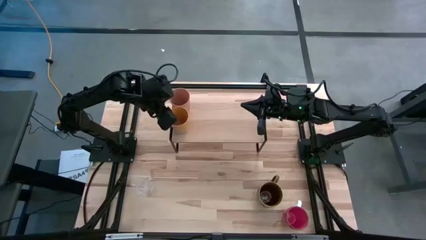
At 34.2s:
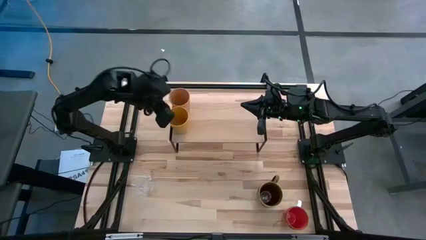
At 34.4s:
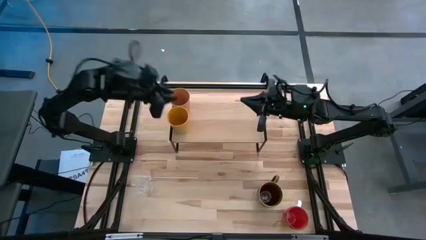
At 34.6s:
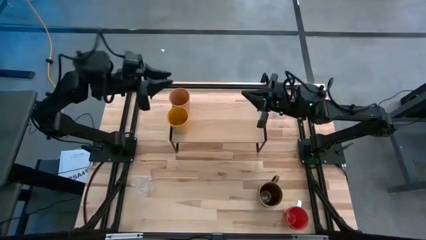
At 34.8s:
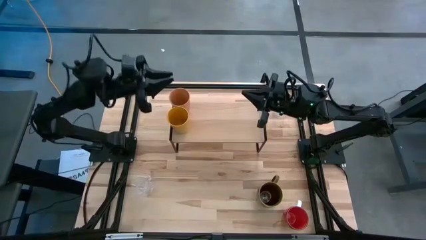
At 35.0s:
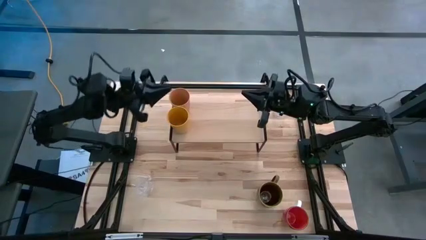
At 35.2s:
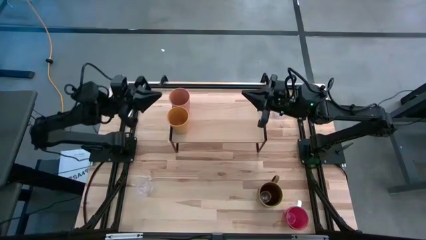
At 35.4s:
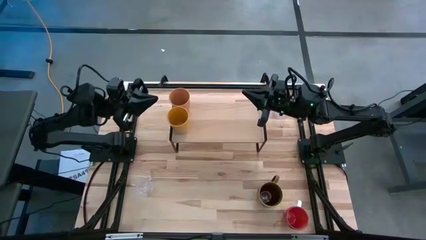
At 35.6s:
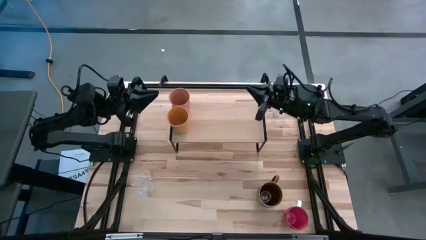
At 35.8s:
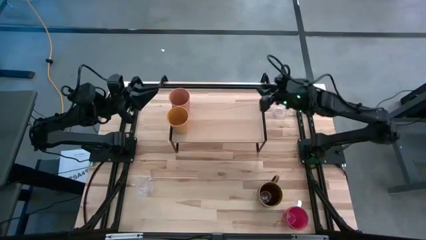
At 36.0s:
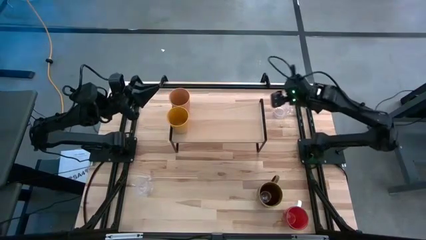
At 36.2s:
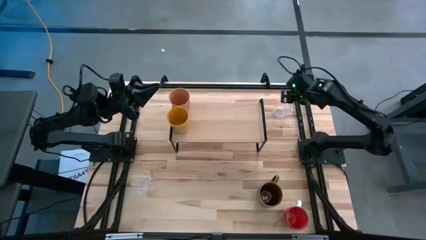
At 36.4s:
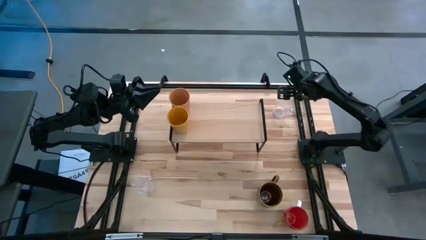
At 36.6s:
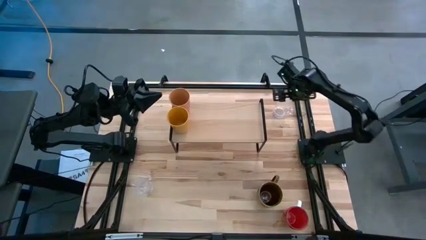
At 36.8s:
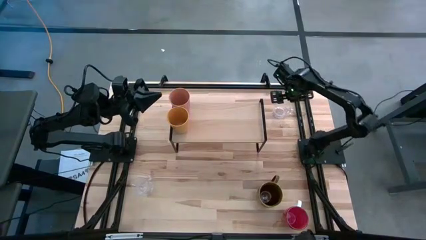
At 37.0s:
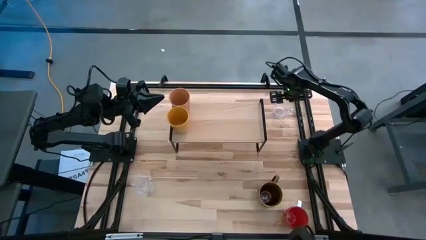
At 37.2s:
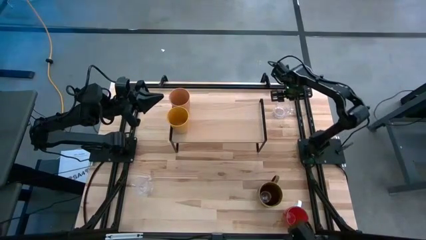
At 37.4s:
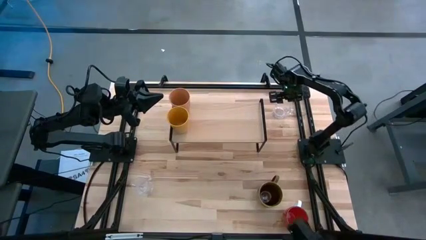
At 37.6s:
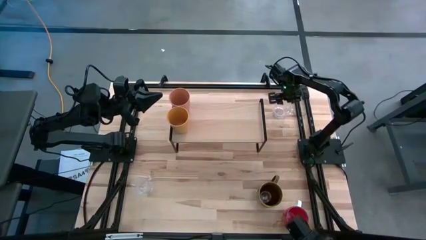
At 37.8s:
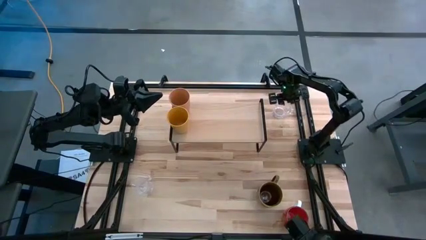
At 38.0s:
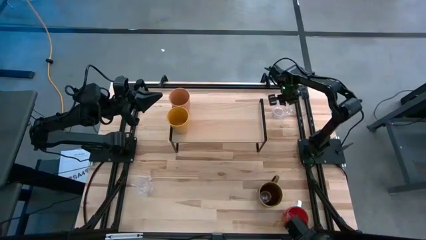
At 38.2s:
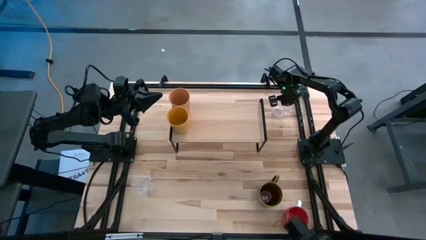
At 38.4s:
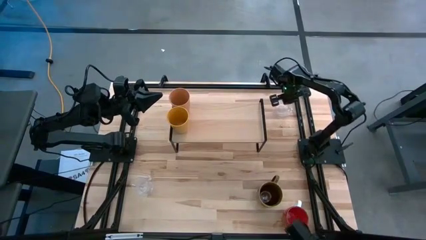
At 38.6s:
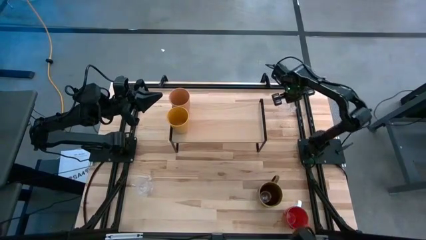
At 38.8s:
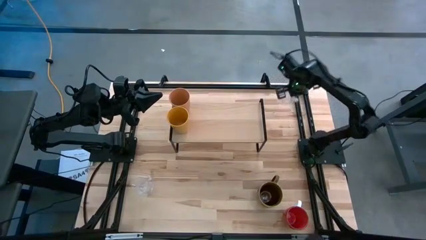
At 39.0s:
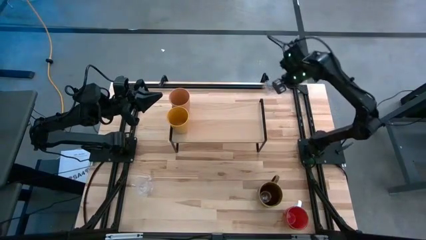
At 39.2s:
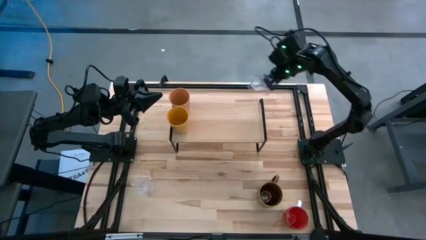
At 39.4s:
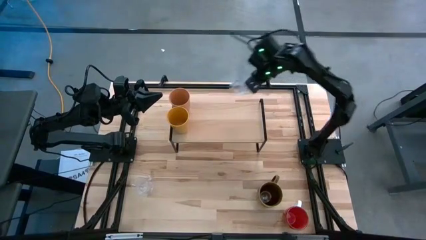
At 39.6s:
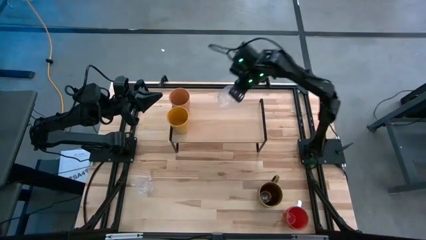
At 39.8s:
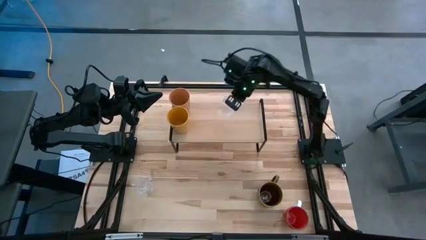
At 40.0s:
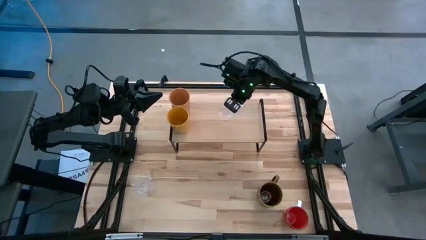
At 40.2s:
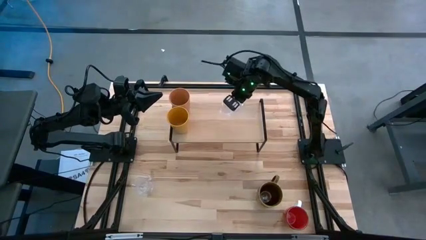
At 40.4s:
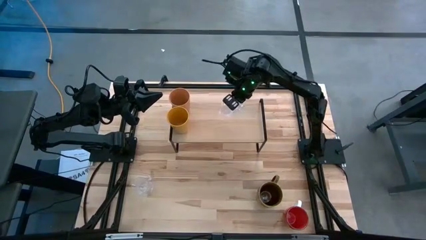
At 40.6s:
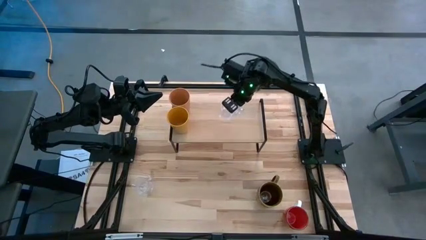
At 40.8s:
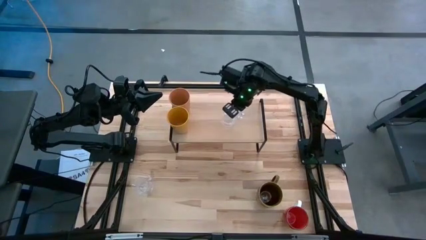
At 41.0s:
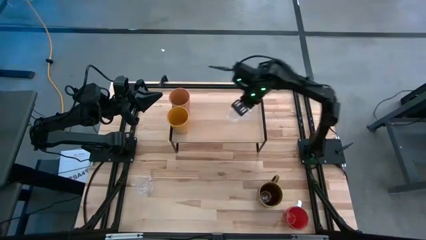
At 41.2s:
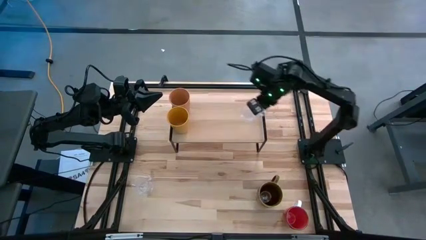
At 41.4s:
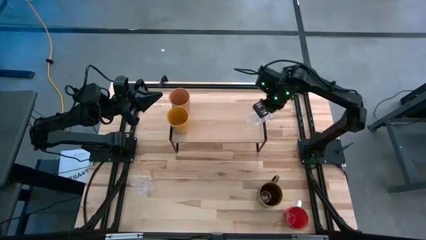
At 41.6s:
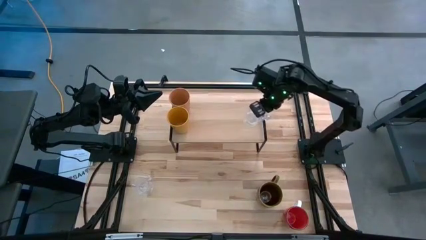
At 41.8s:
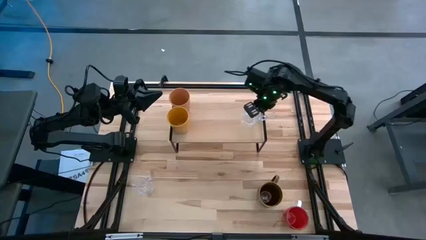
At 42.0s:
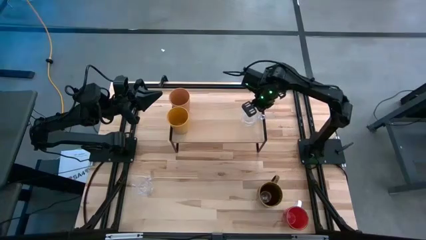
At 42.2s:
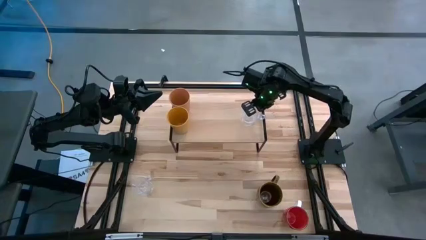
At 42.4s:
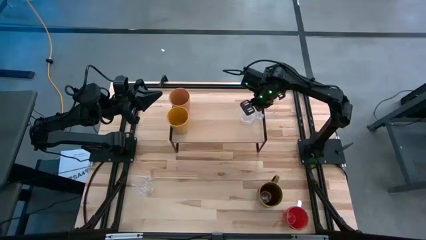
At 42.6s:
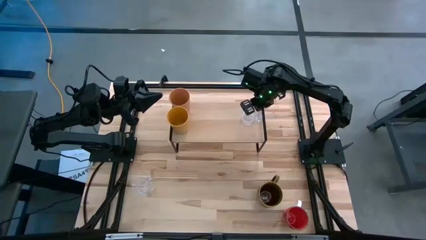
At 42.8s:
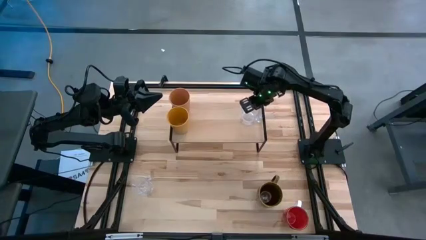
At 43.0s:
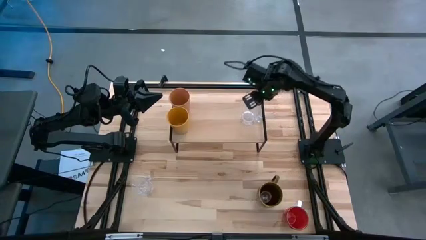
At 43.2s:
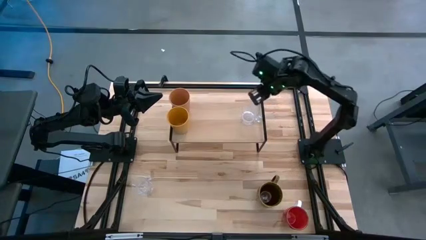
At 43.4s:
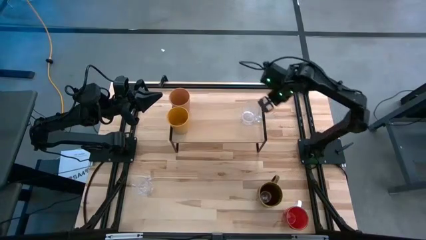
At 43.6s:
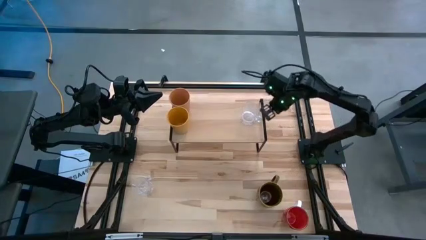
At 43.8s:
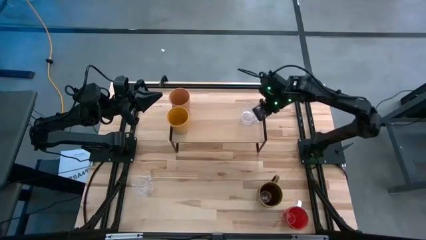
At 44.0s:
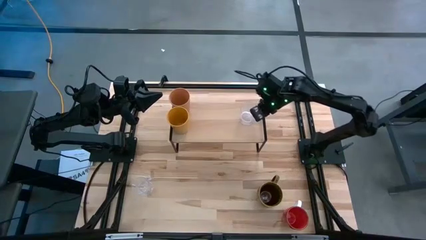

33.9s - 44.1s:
Task: Stack small to large cups/mugs on shelf
Put the top transparent mug on the shelf

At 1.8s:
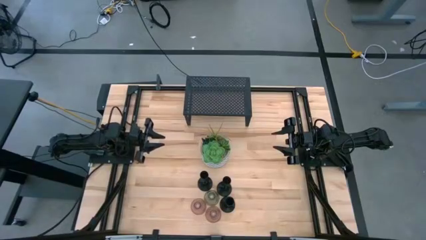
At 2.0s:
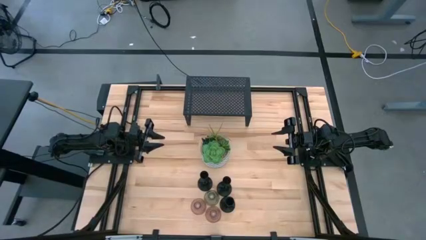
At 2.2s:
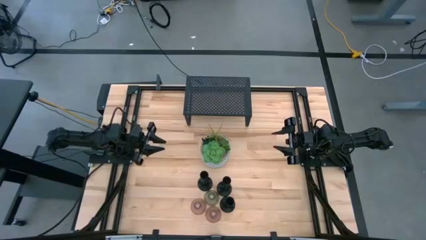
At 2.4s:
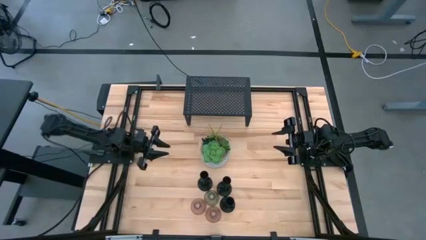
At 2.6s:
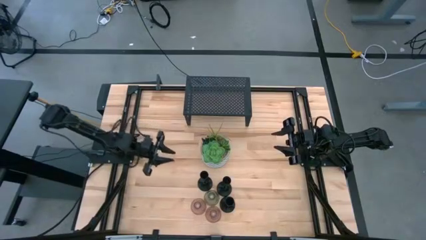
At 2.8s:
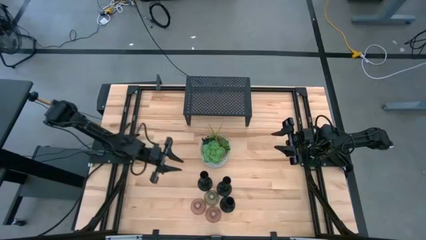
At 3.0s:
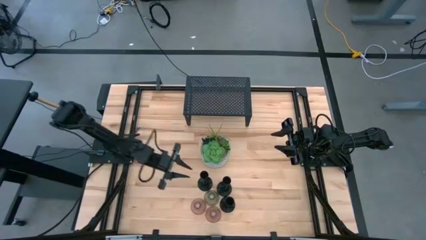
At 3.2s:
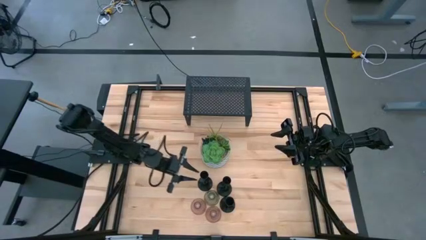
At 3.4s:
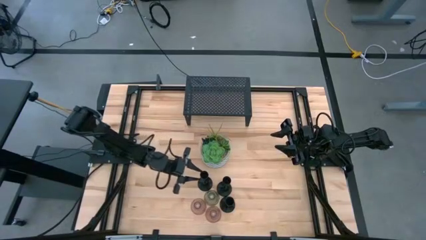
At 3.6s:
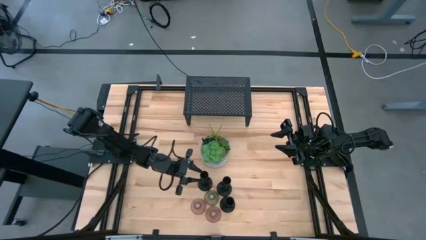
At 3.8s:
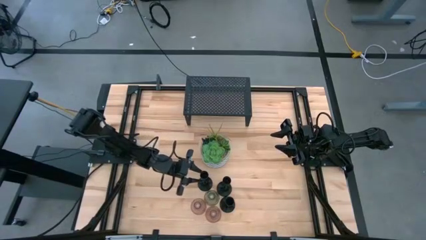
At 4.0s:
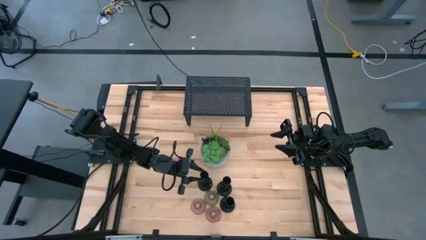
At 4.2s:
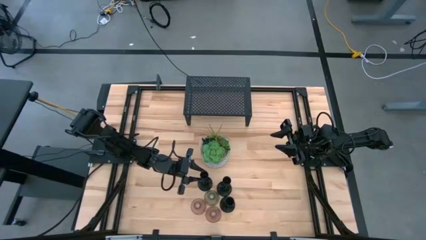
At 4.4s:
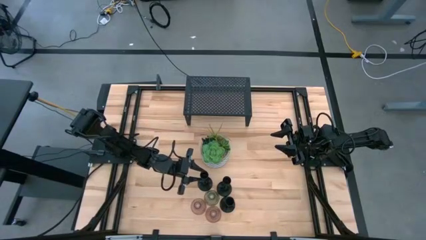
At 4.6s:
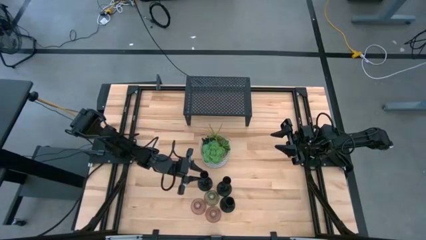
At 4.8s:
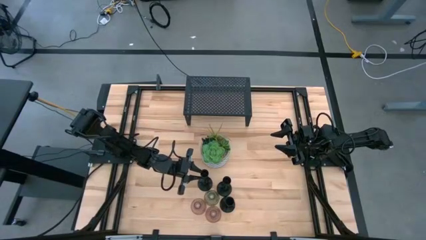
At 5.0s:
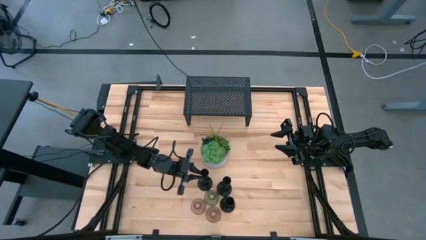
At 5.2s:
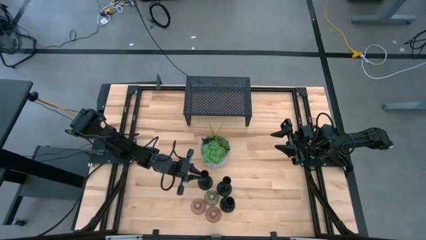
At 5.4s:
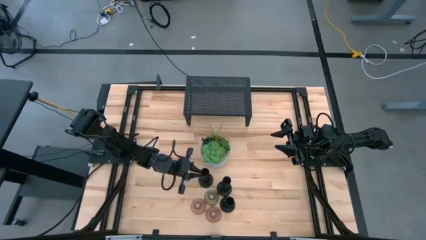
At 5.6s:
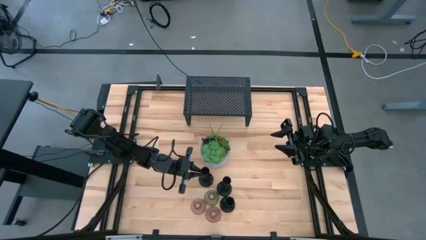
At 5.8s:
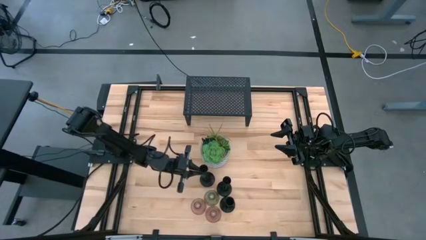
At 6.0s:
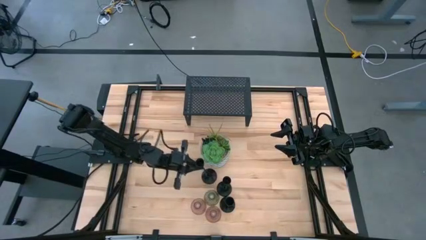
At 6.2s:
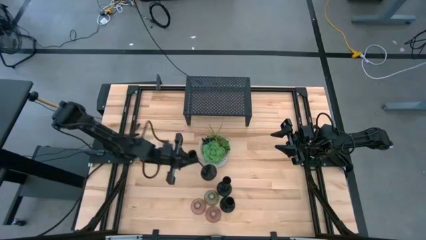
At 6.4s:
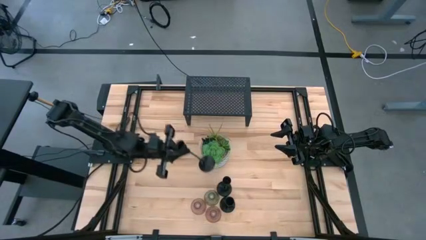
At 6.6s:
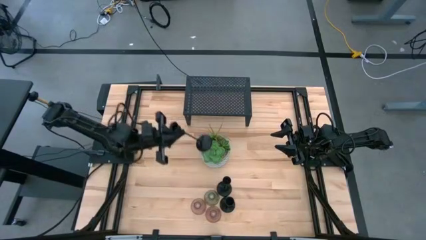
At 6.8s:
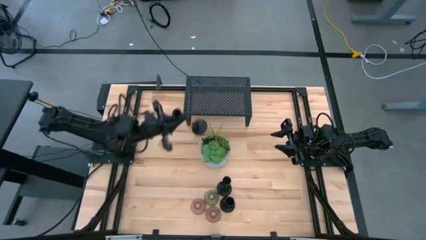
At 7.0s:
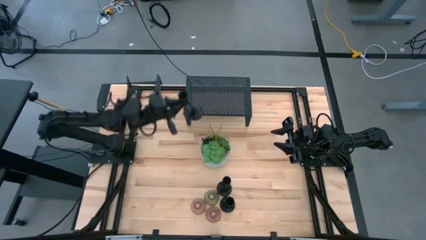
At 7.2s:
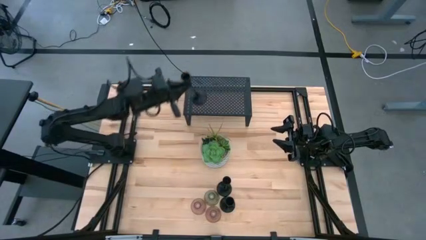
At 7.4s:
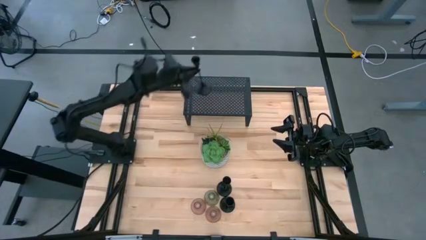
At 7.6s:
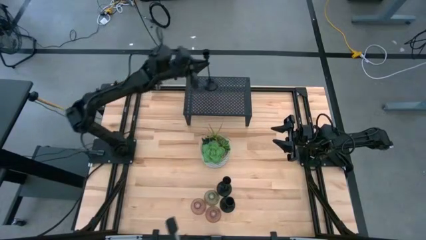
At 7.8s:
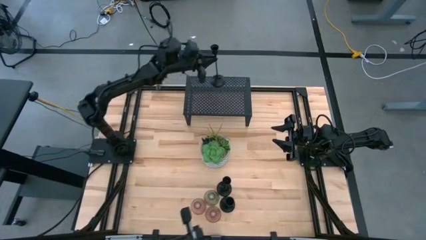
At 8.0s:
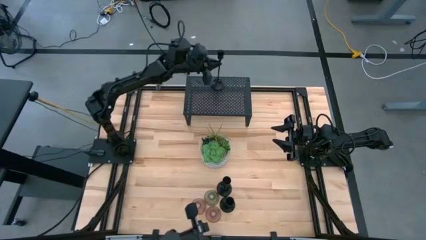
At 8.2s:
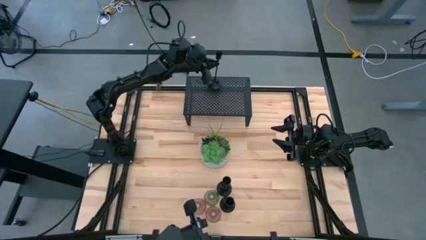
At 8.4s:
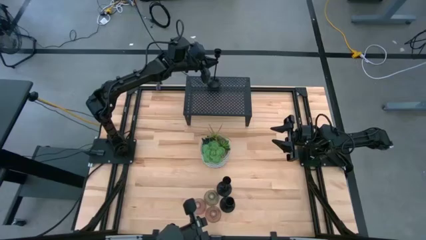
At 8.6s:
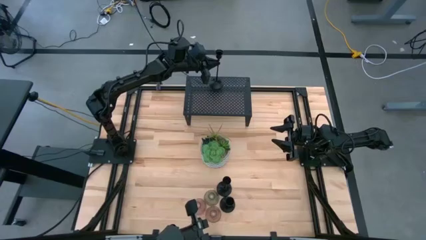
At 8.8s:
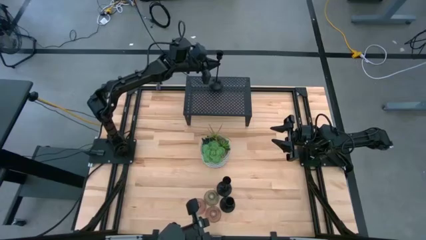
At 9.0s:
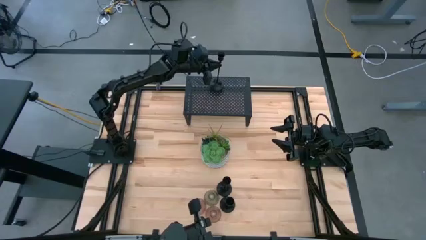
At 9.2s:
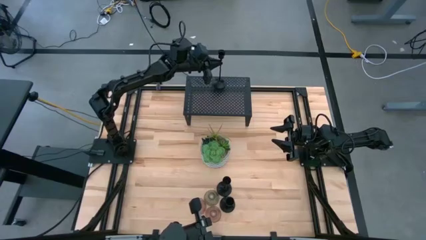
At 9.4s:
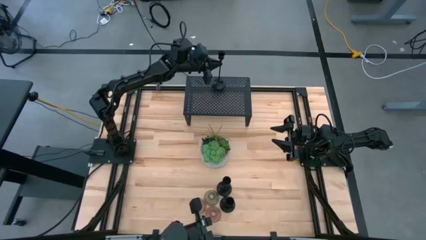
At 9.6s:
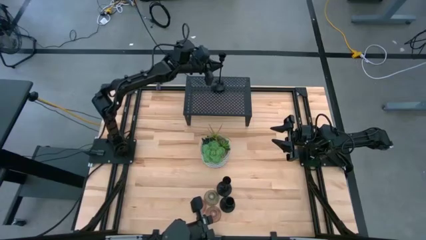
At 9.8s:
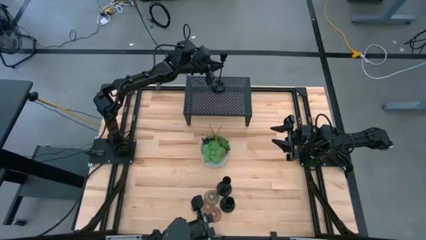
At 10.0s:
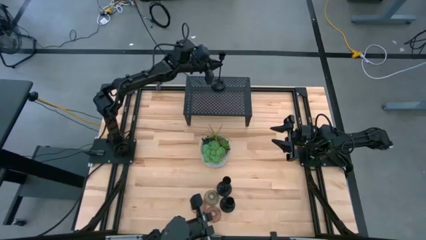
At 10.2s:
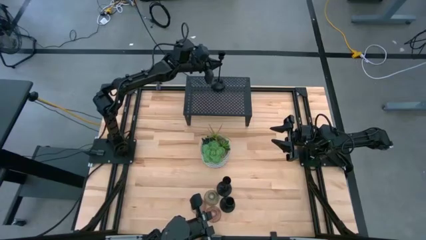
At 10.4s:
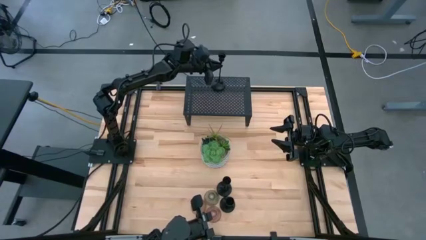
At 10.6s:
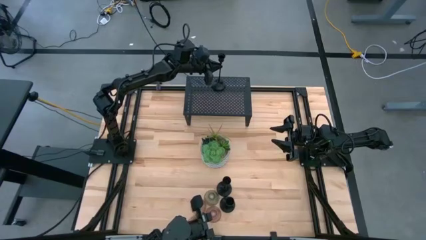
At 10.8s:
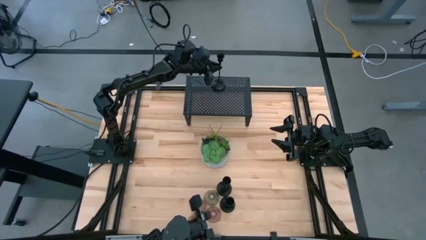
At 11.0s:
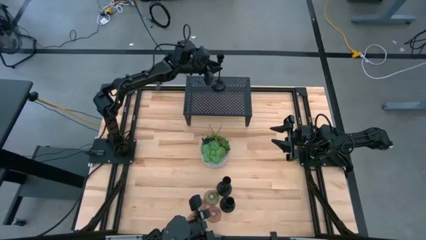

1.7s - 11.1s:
Task: Pick & Place candle stick holders
Put the top left black candle holder on the shelf
